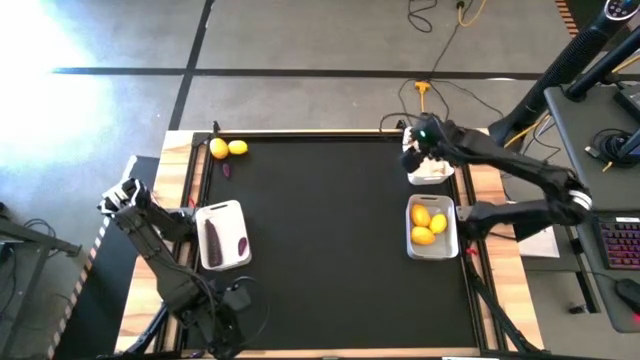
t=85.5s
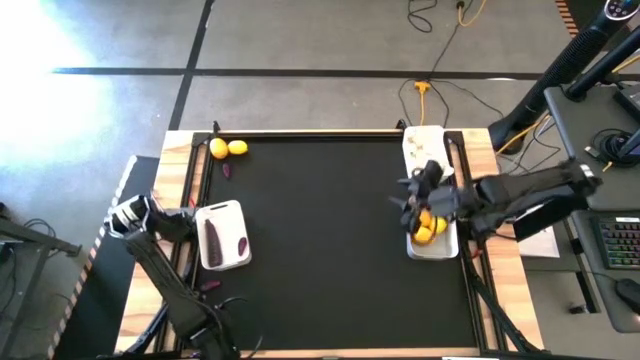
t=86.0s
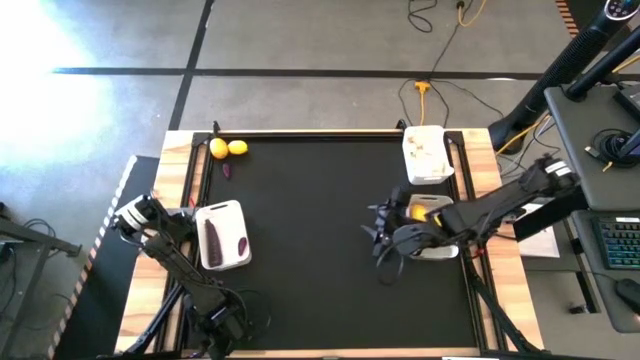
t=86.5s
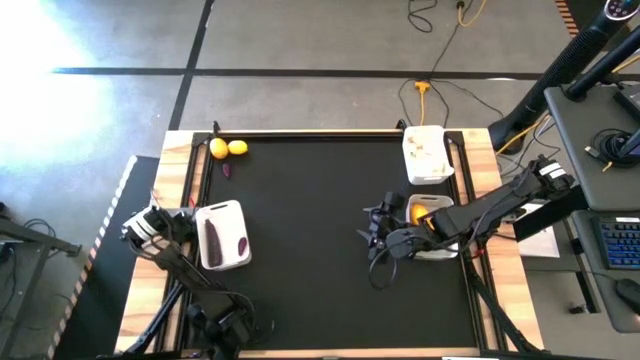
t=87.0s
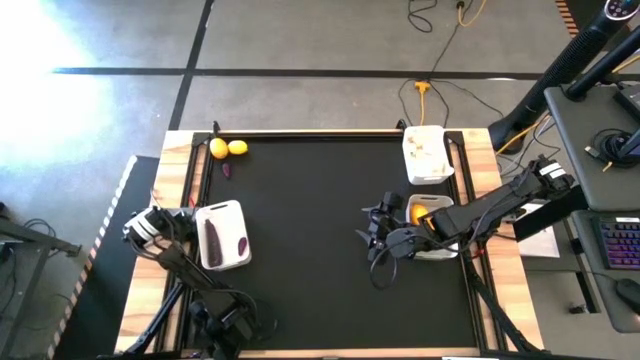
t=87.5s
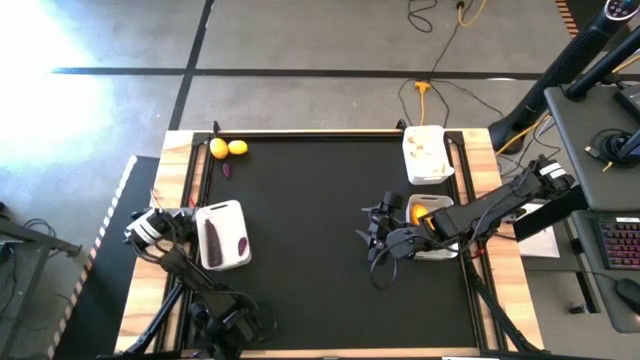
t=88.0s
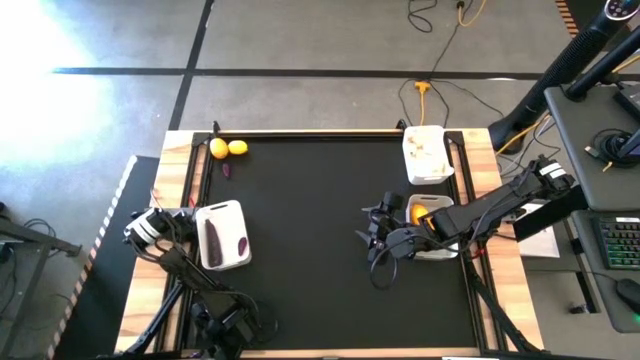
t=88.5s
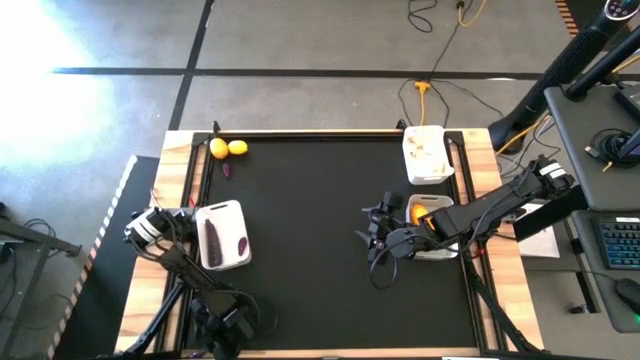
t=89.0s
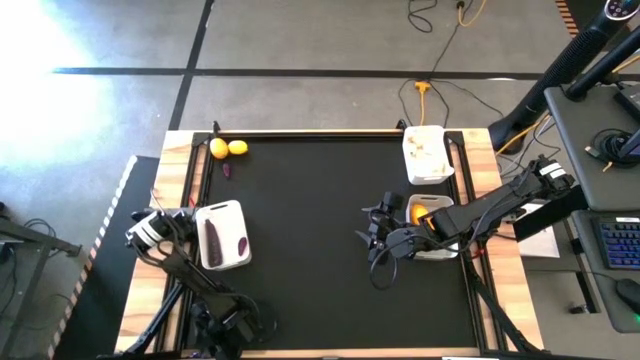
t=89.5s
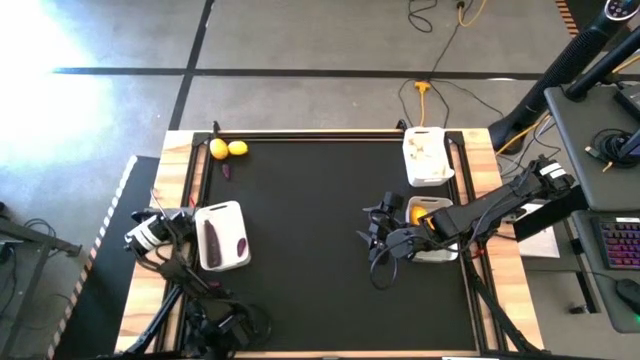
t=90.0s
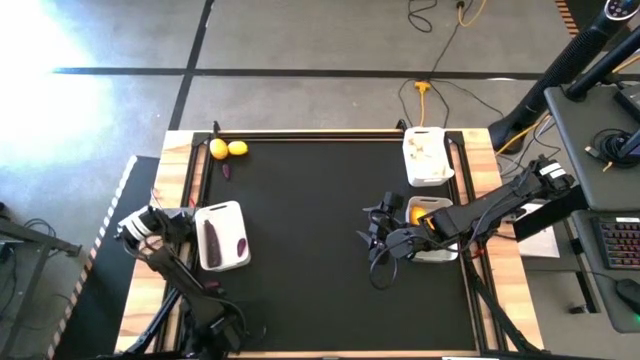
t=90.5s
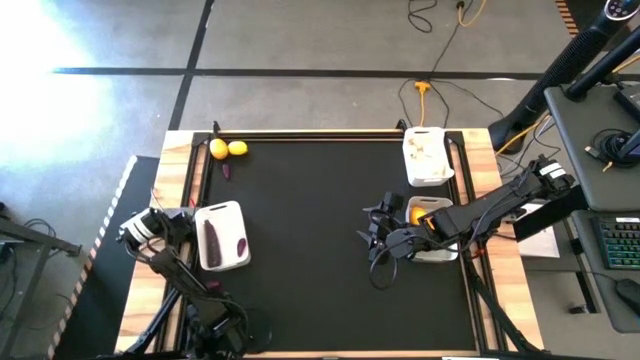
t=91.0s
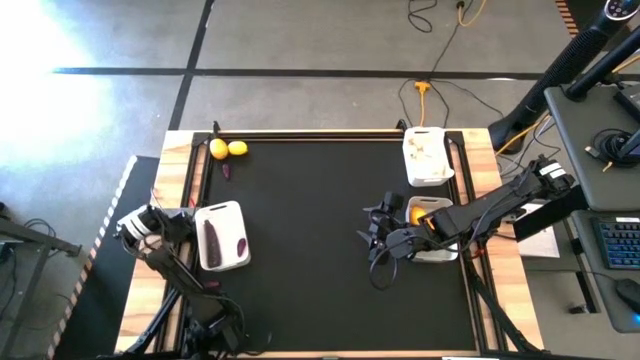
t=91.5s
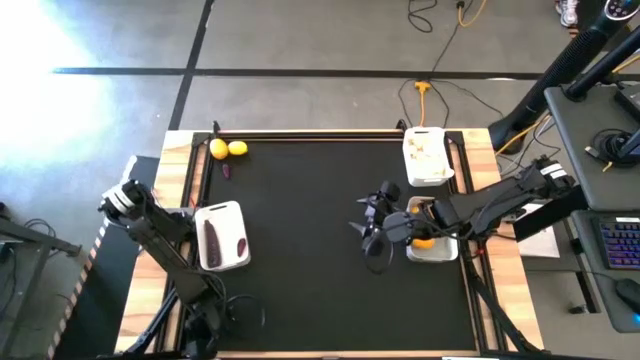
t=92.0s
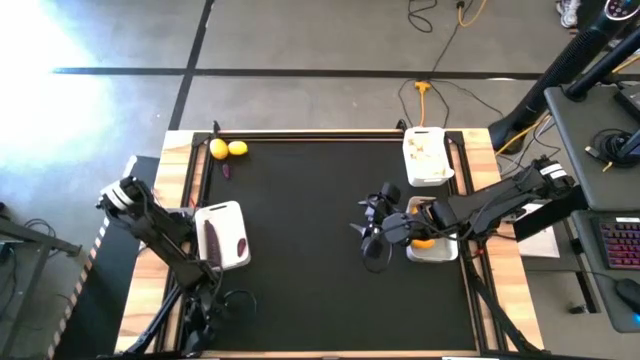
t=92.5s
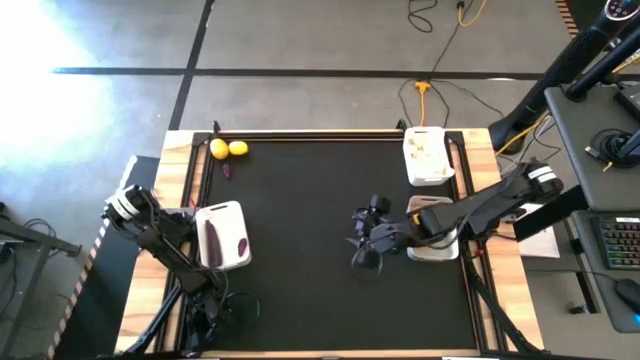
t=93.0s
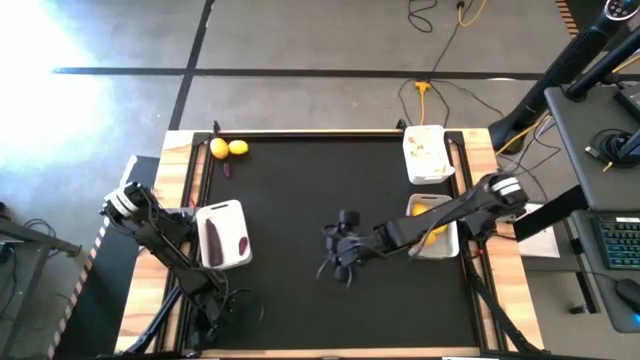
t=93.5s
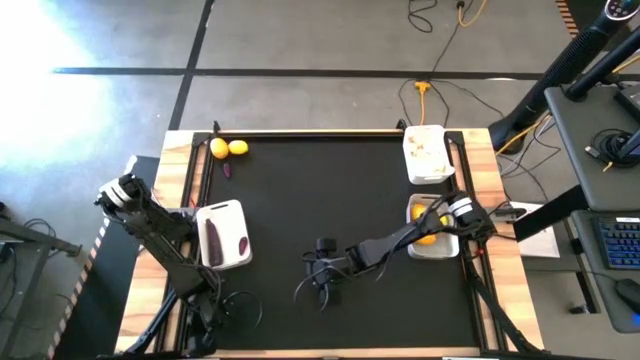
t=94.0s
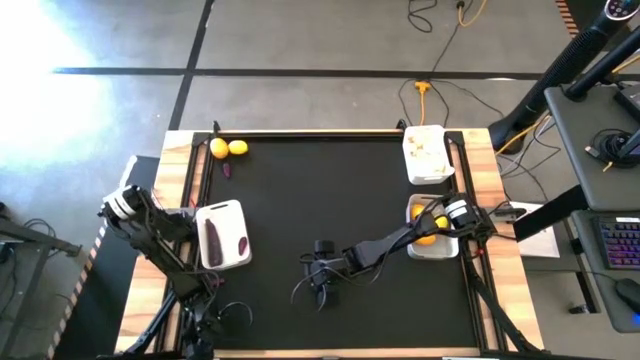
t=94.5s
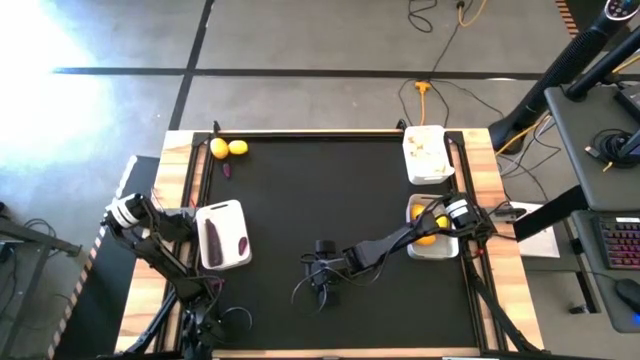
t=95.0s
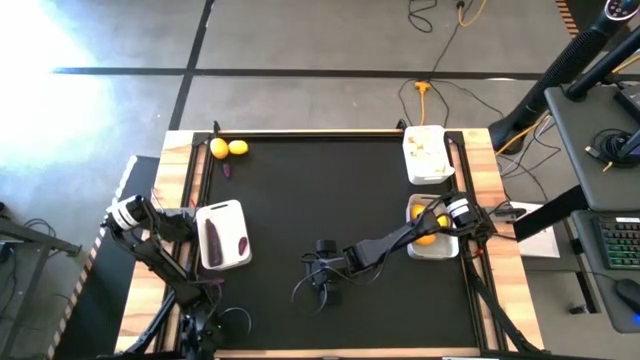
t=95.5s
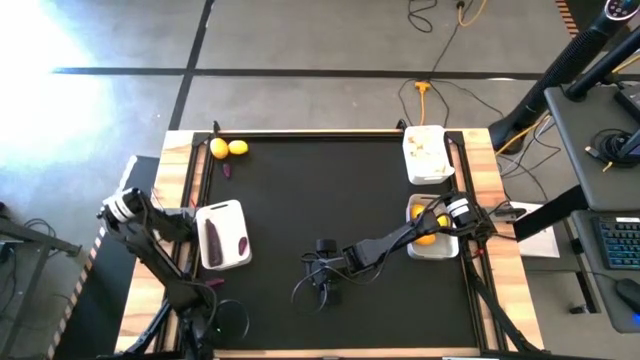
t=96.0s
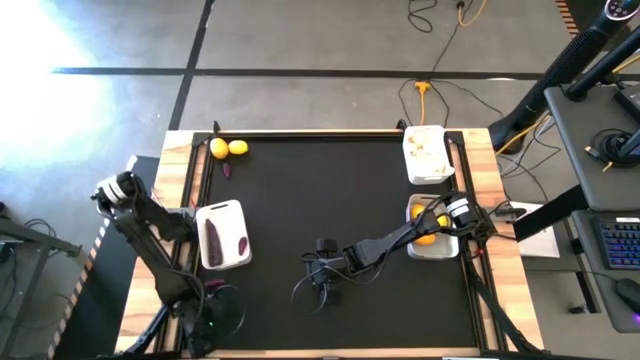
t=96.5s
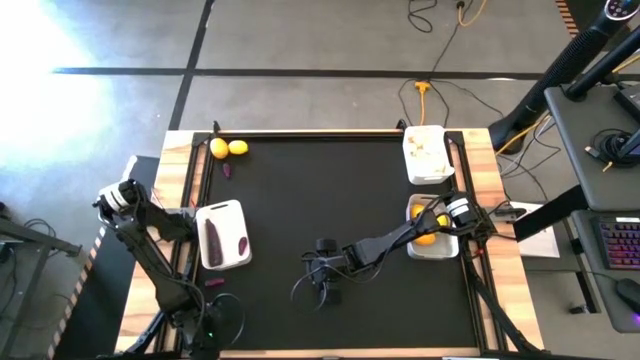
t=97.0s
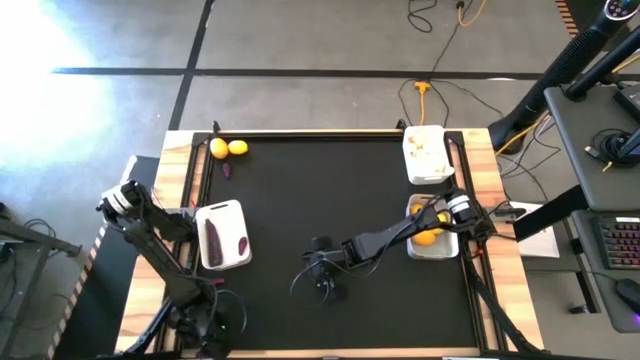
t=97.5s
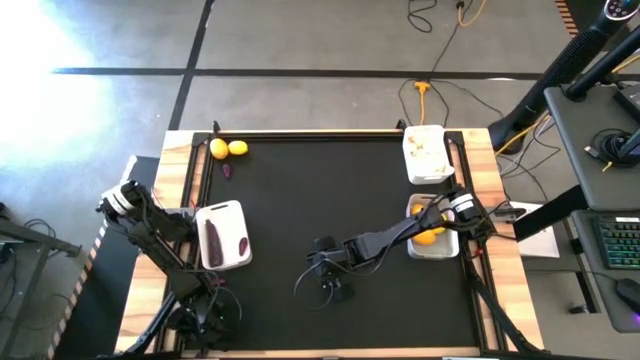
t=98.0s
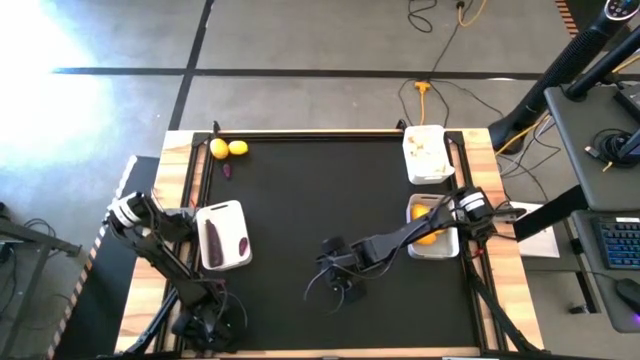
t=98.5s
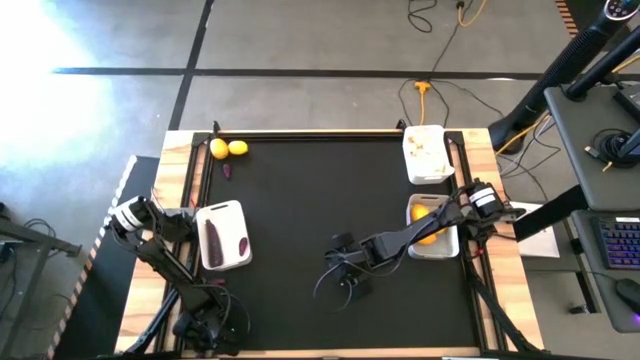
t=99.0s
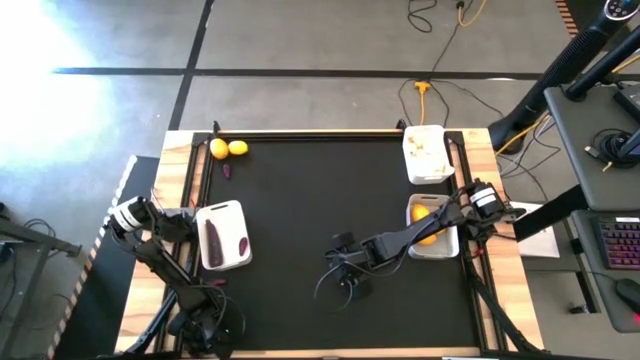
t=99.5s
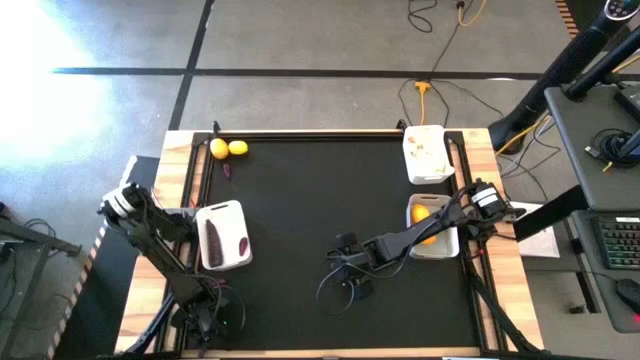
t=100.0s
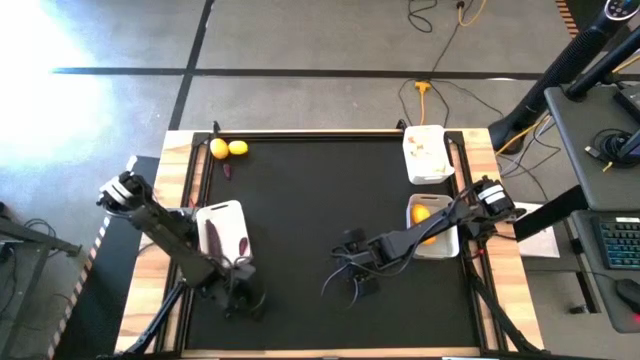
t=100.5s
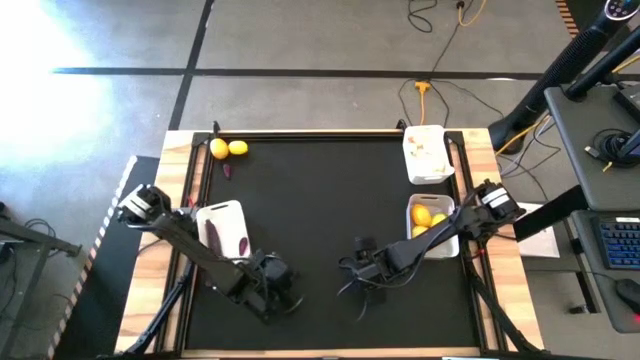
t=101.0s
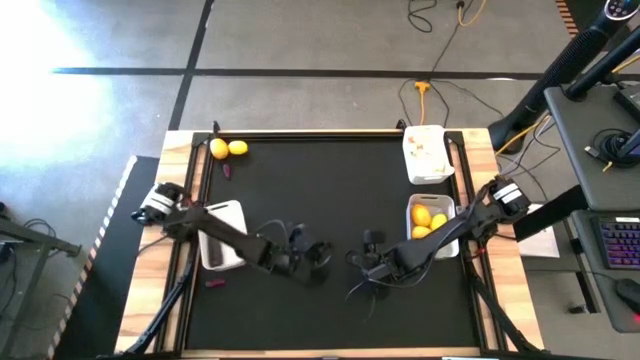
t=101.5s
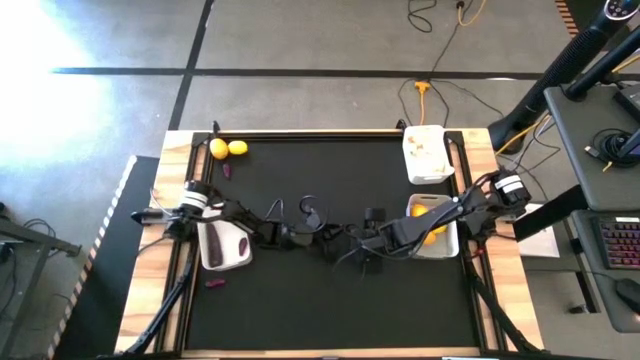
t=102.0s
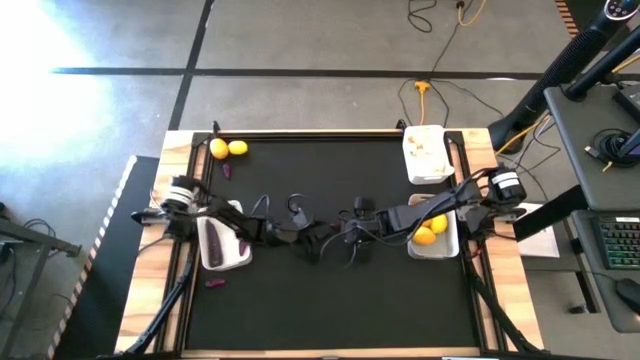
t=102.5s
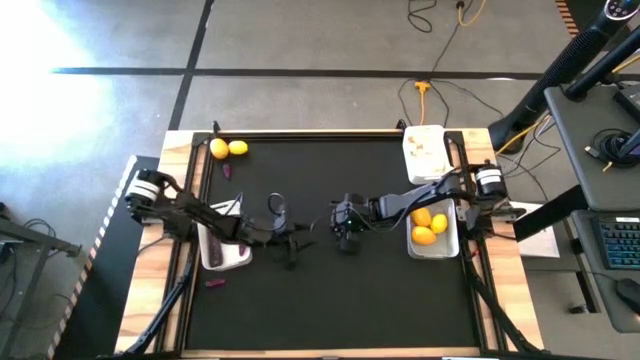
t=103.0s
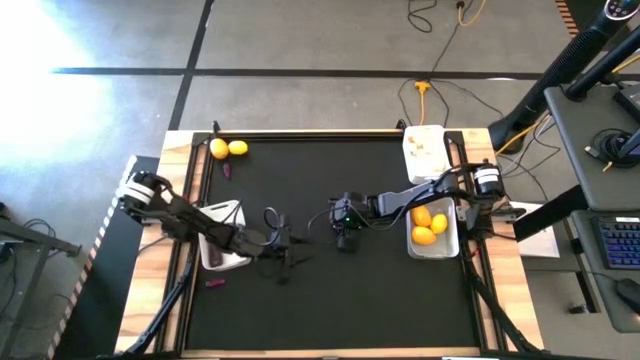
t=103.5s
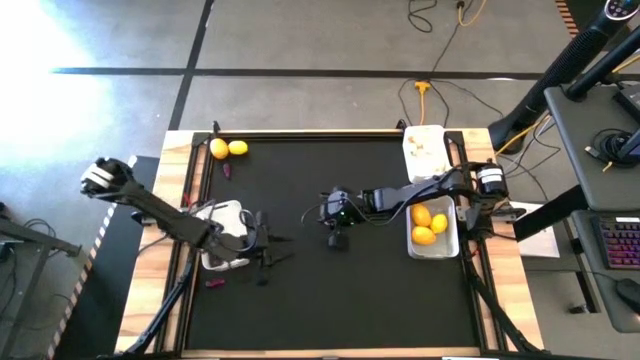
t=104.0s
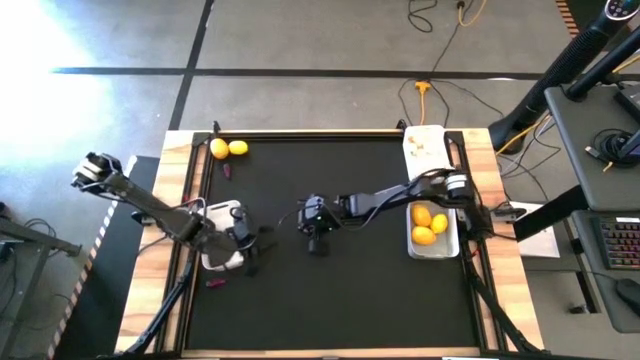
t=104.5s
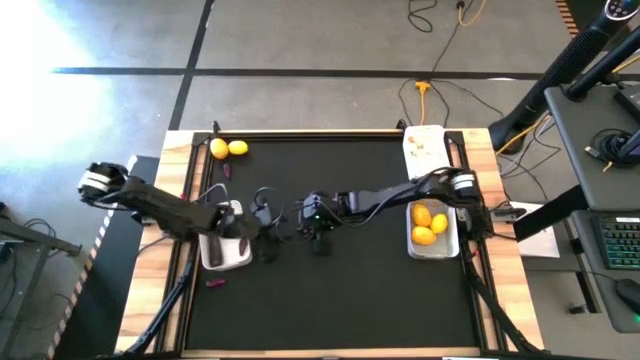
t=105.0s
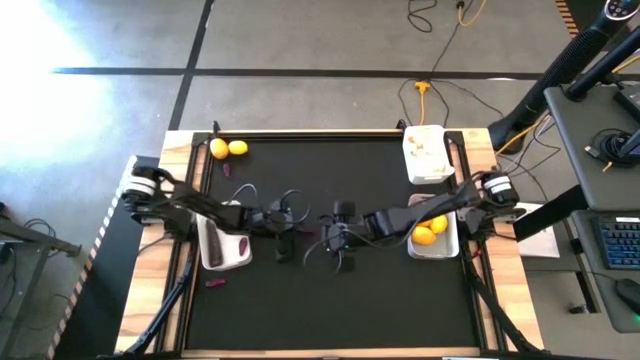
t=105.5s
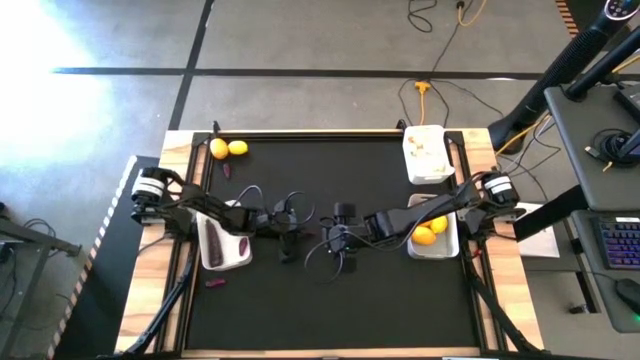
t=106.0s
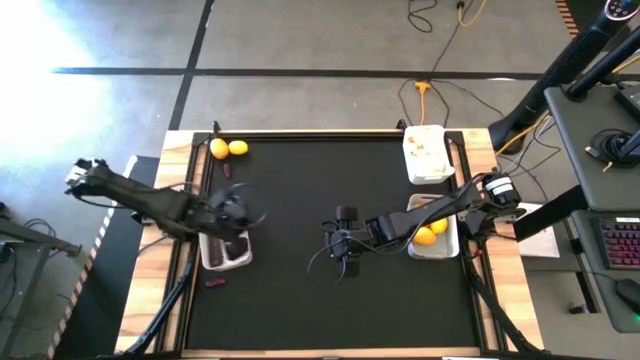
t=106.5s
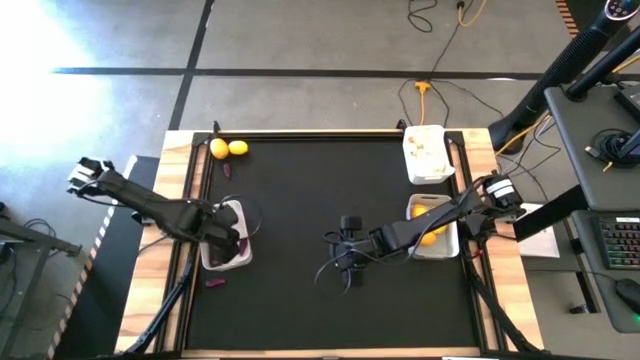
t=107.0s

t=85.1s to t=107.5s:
Task: Sort produce into baskets
Put the eggplant into the bottom white bin
